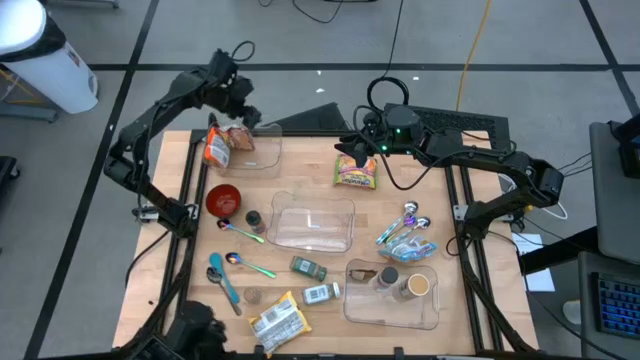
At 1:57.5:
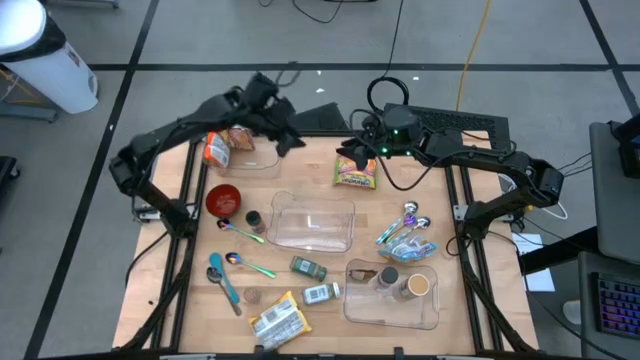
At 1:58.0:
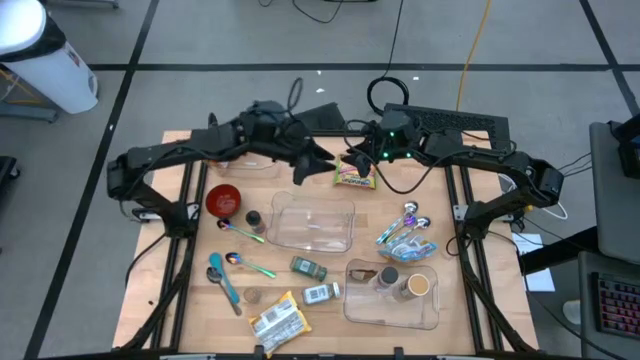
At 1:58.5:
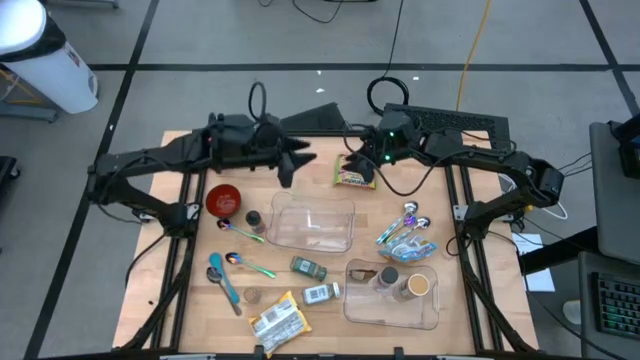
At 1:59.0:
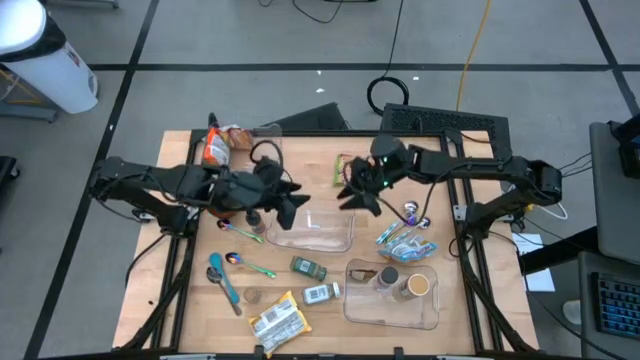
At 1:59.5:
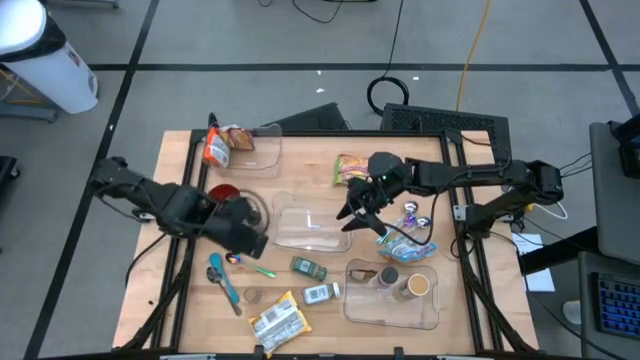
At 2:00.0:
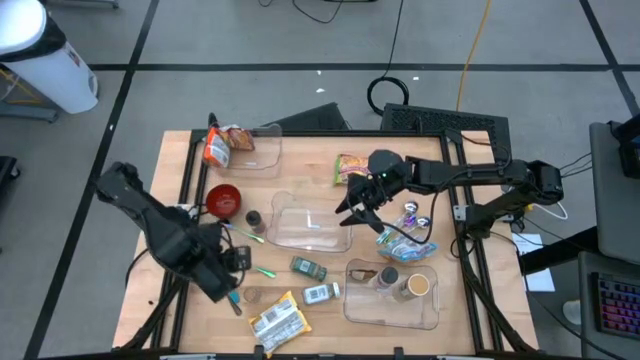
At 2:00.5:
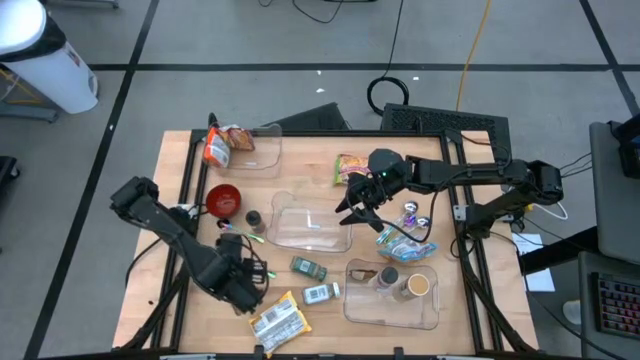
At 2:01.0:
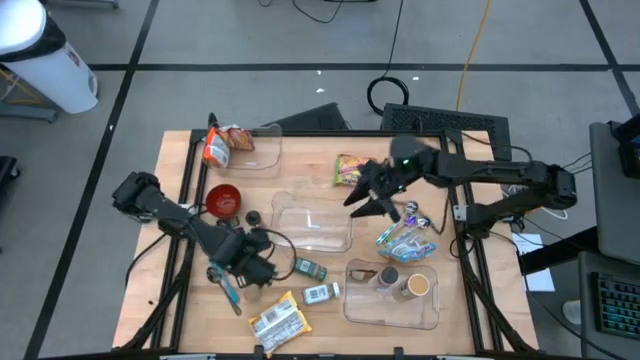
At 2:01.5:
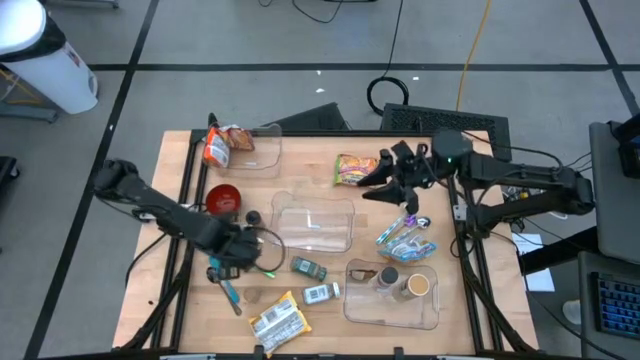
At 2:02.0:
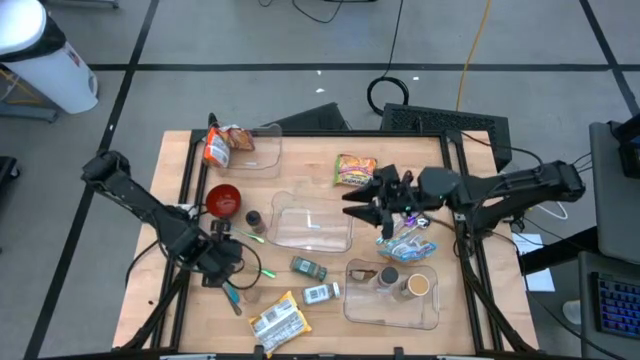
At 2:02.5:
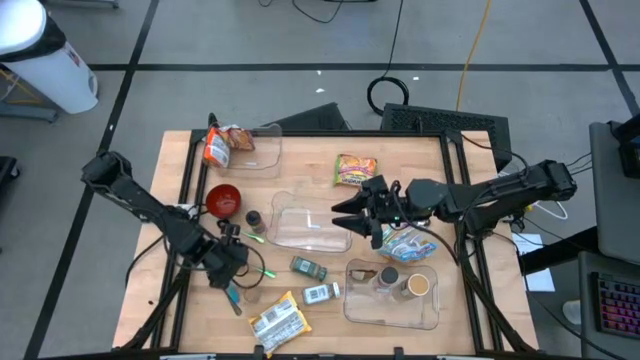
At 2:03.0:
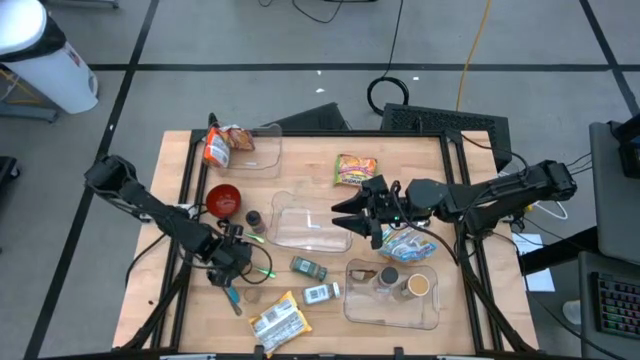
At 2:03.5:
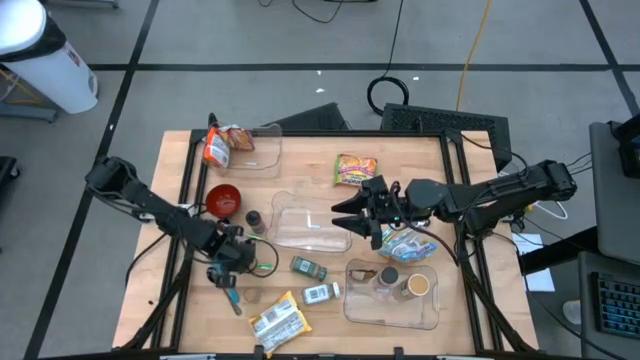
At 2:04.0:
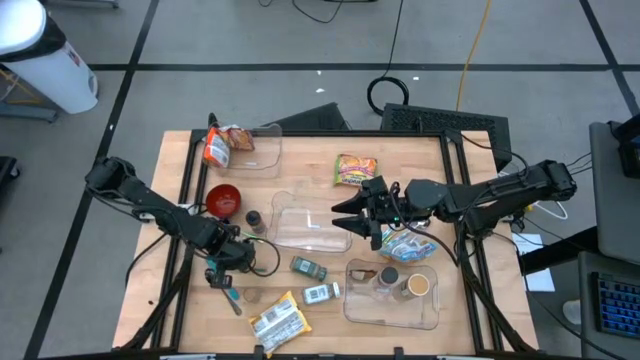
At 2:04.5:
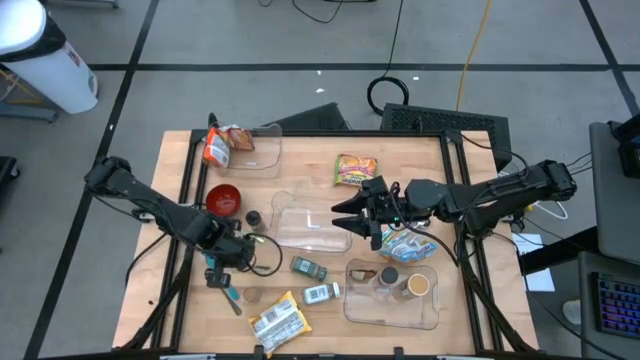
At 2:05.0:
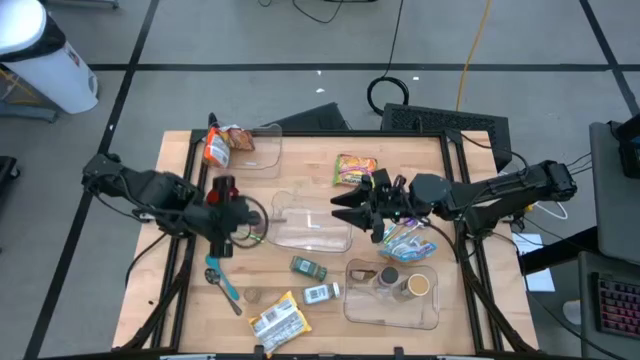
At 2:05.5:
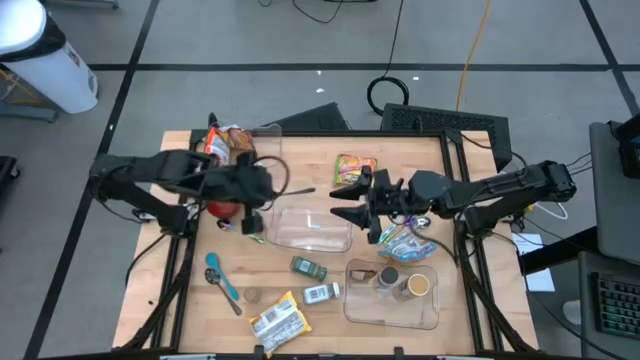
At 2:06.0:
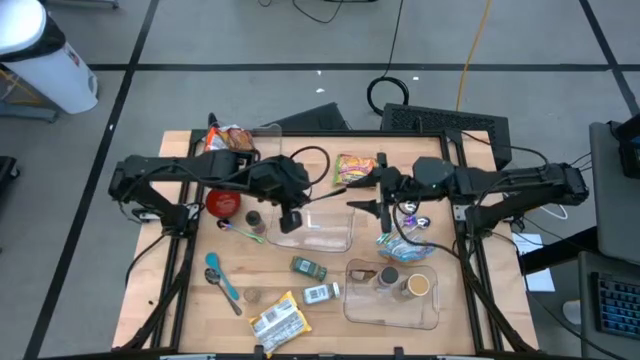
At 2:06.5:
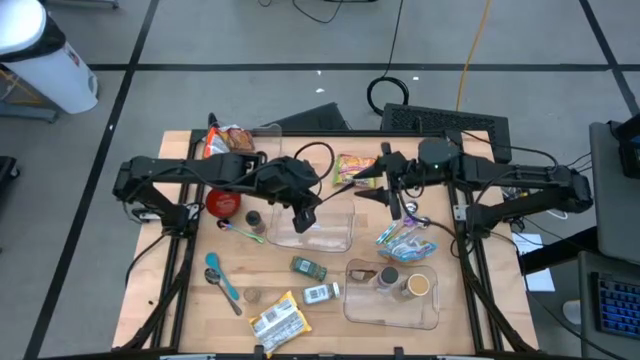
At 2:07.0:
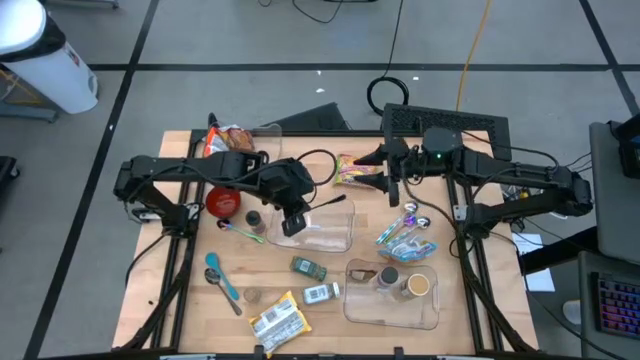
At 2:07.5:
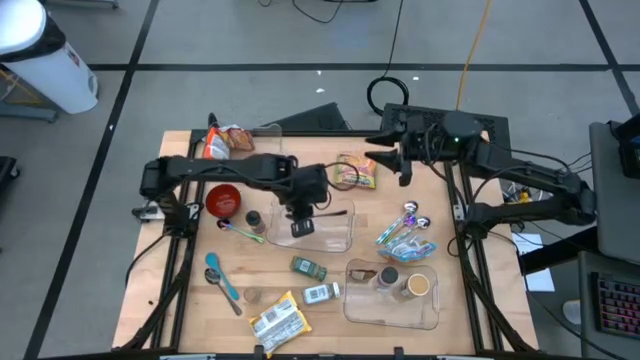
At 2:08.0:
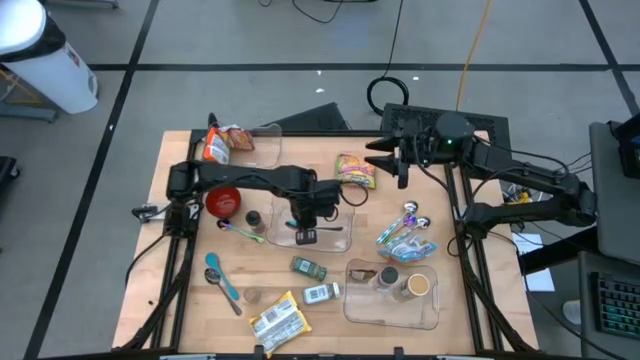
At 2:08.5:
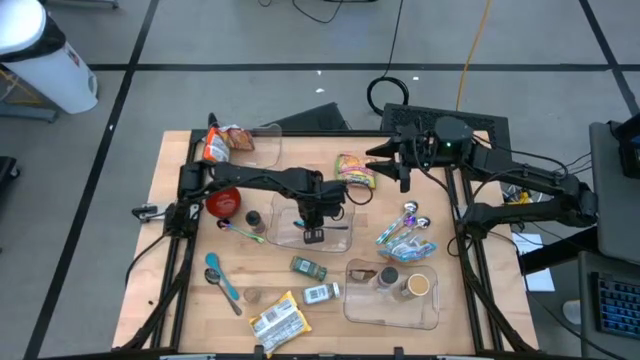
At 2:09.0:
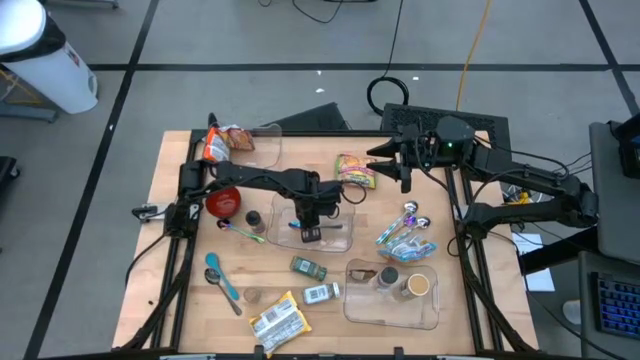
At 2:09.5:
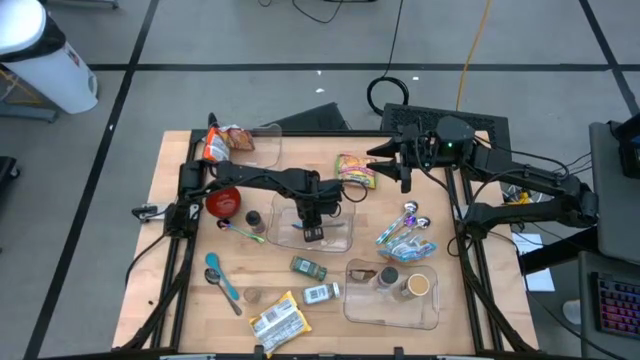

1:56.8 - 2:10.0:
Task: Pick & Place Food Item
Put the bottom blue spoon into the middle transparent bin

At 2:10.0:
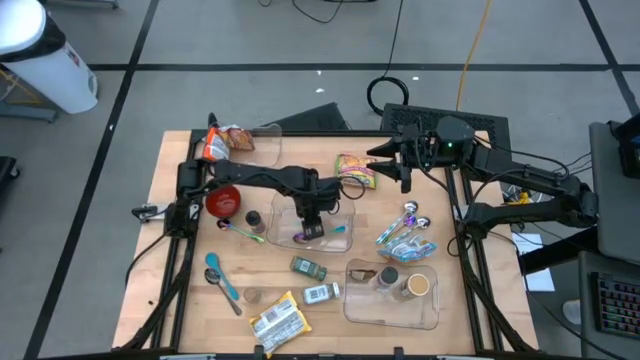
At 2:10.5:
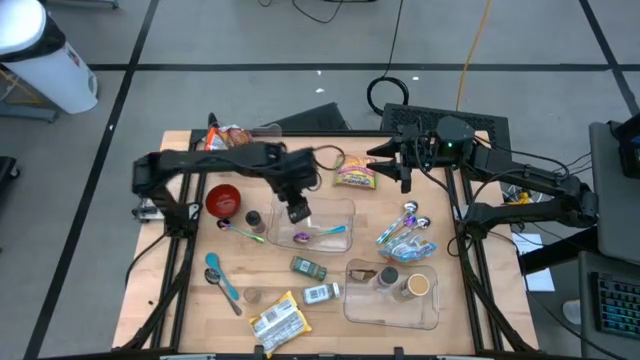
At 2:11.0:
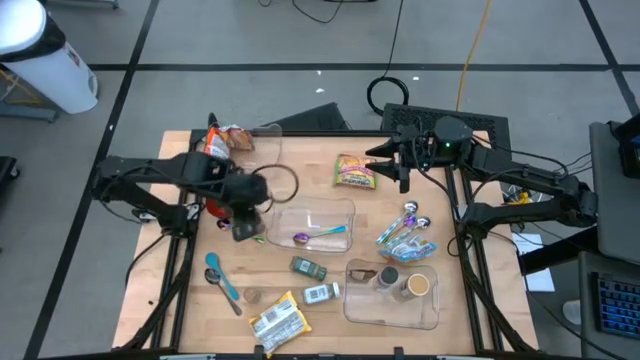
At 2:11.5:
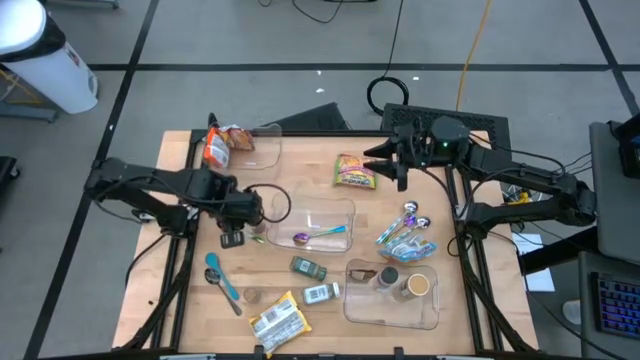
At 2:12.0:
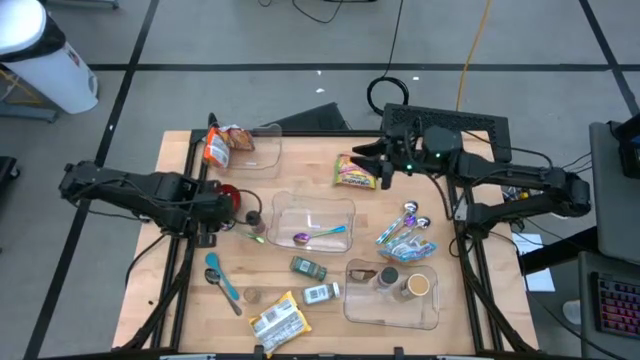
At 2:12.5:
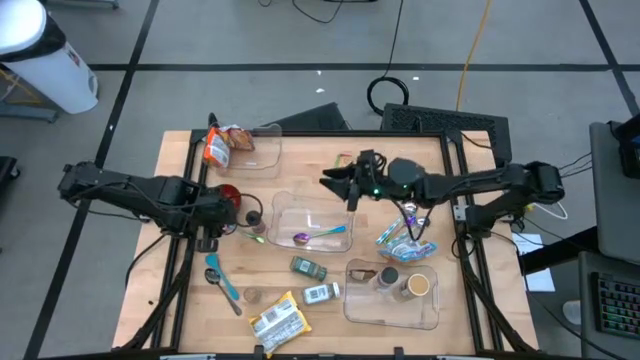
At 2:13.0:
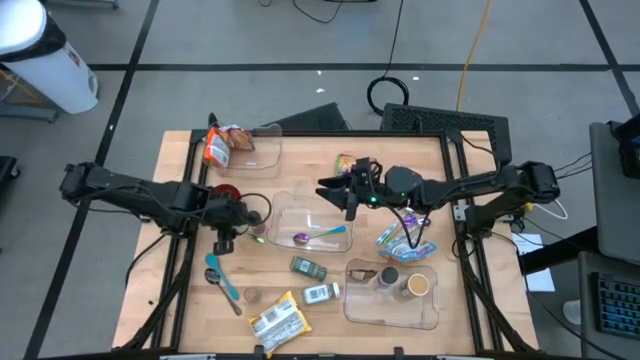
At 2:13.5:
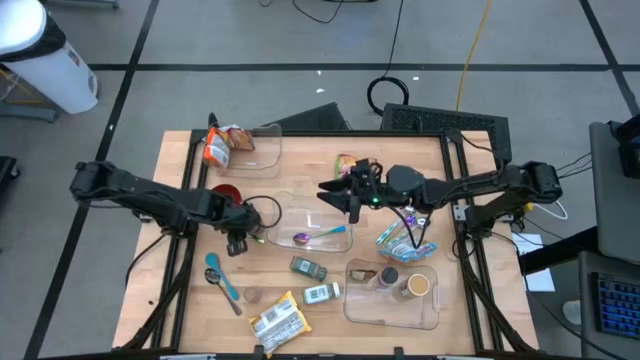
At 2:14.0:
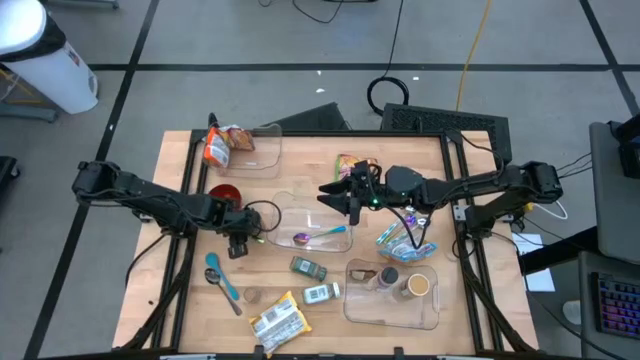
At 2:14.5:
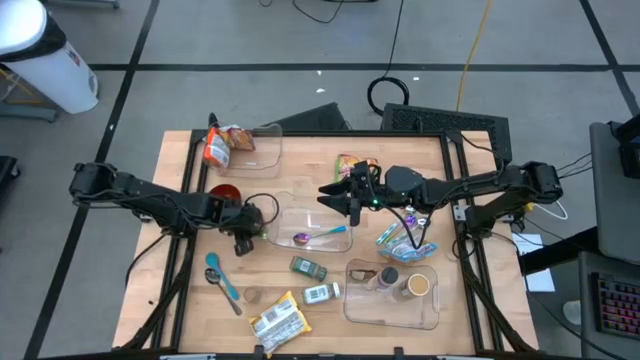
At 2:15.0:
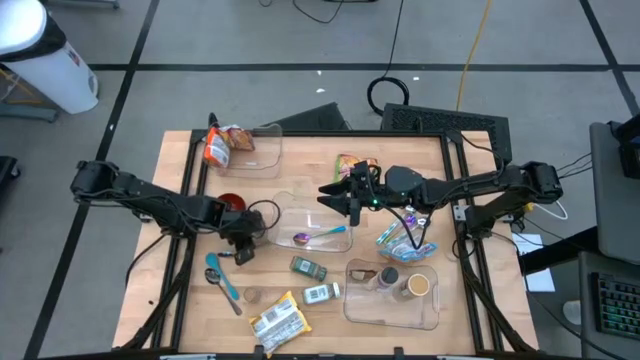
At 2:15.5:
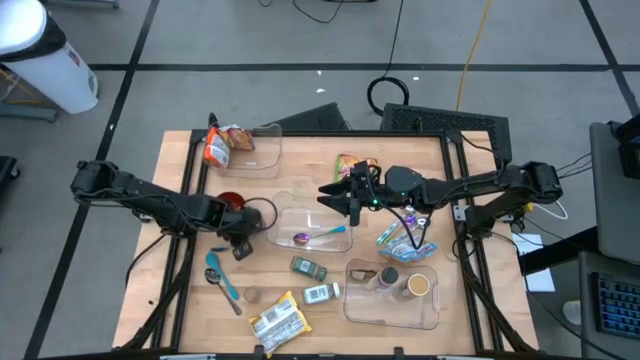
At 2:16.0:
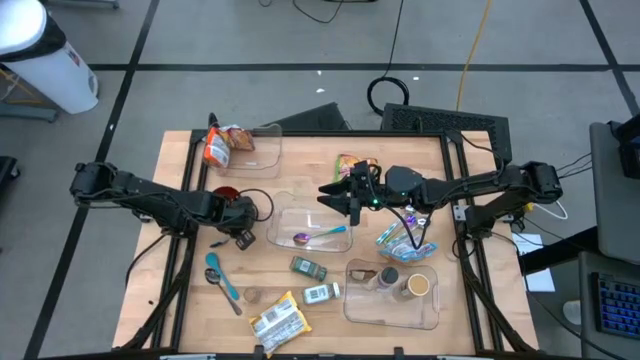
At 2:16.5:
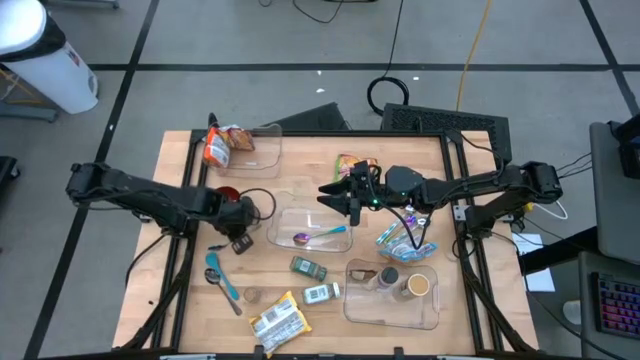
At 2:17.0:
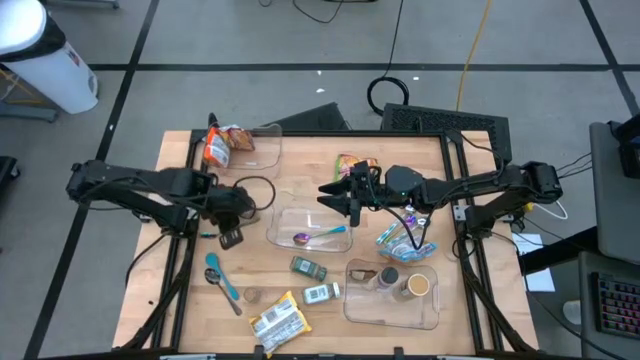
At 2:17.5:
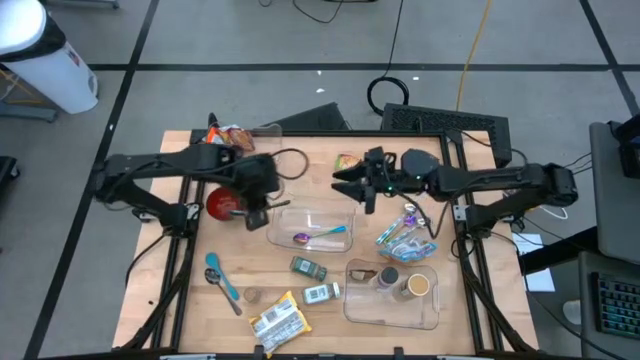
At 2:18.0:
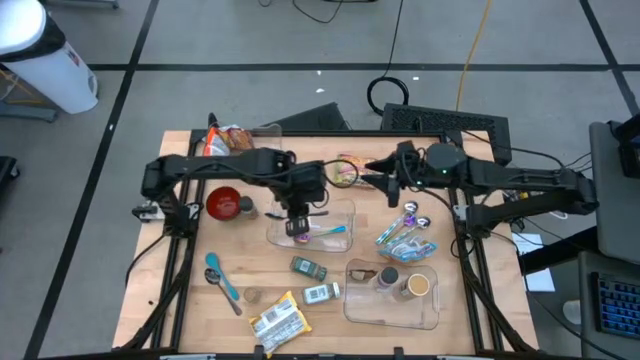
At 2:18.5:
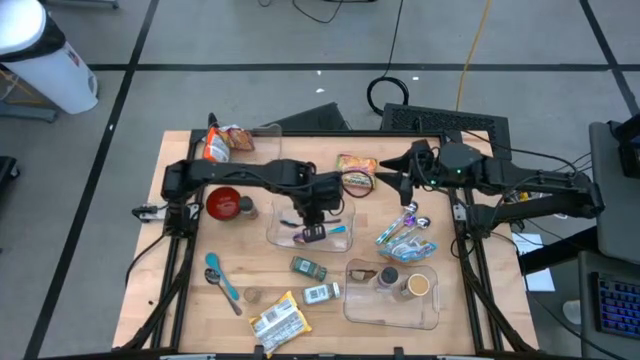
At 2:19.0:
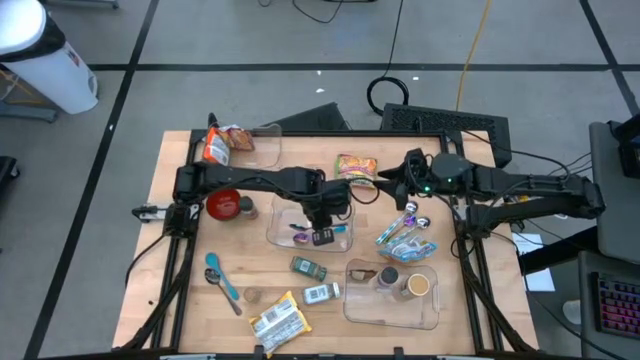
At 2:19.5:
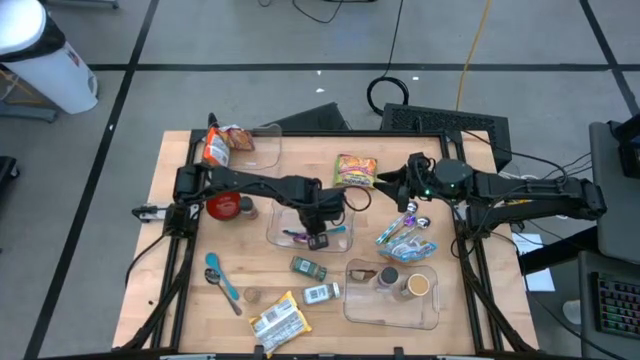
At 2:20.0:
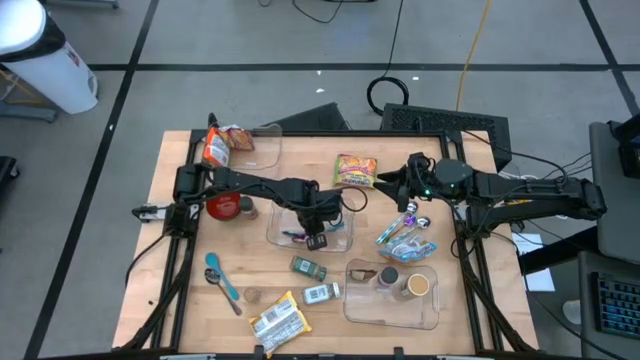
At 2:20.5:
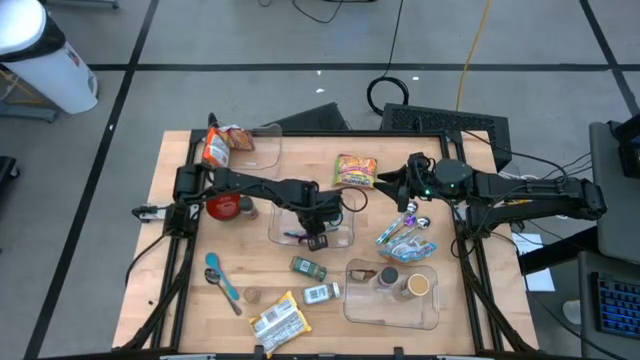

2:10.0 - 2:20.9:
Put the left blue spoon into the middle transparent bin
